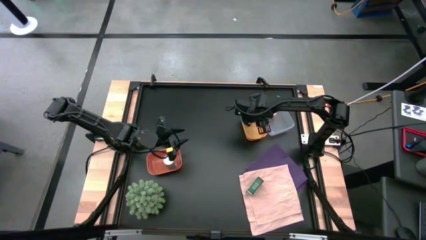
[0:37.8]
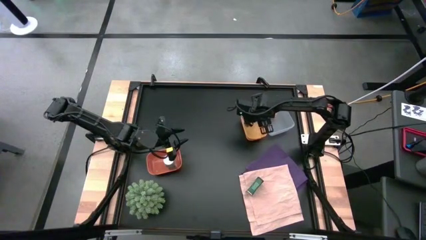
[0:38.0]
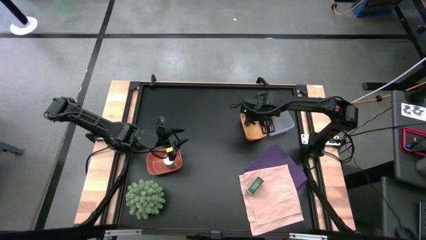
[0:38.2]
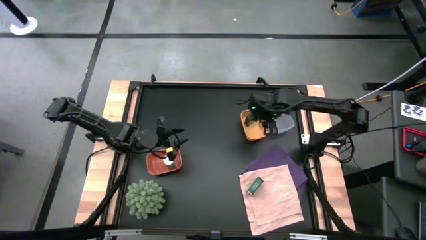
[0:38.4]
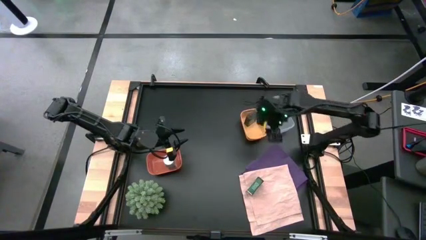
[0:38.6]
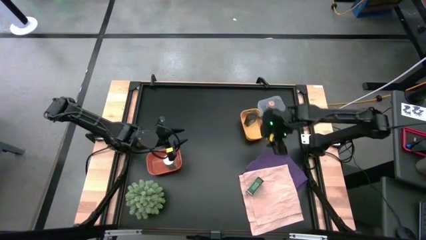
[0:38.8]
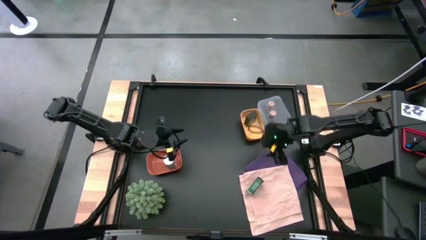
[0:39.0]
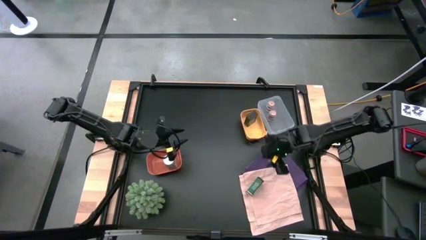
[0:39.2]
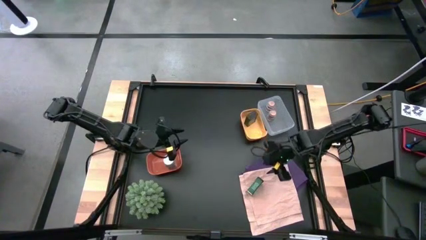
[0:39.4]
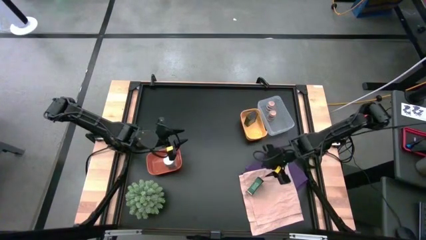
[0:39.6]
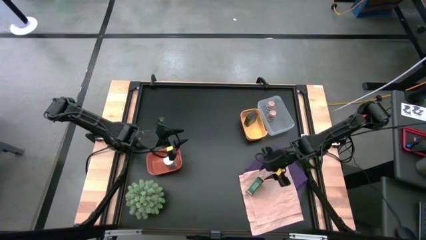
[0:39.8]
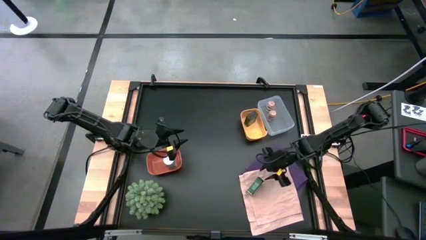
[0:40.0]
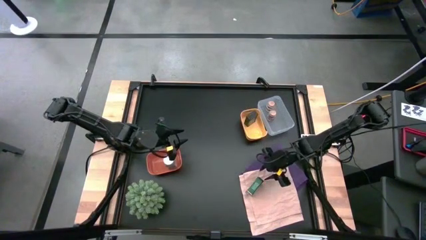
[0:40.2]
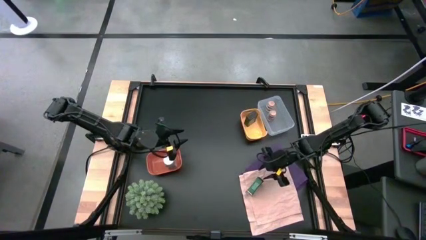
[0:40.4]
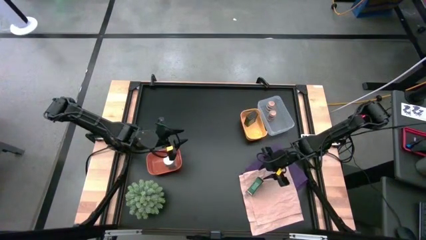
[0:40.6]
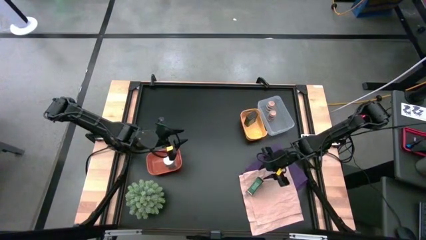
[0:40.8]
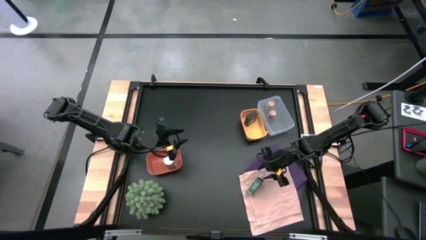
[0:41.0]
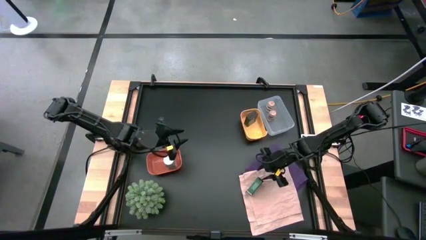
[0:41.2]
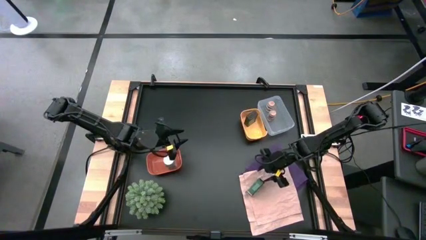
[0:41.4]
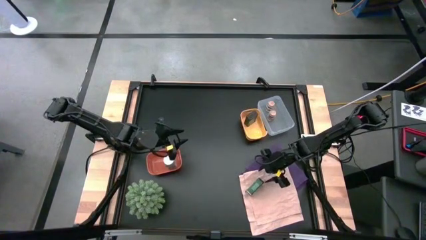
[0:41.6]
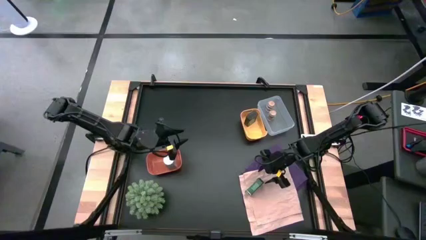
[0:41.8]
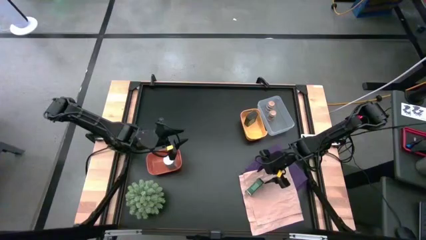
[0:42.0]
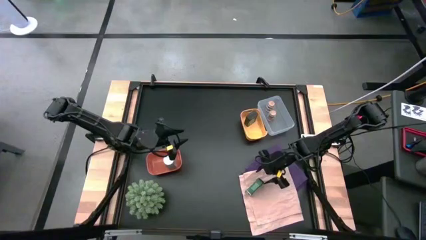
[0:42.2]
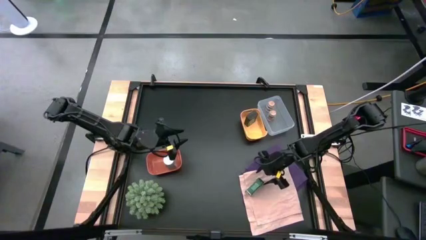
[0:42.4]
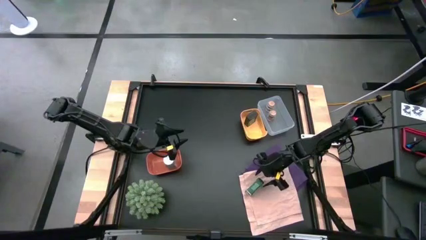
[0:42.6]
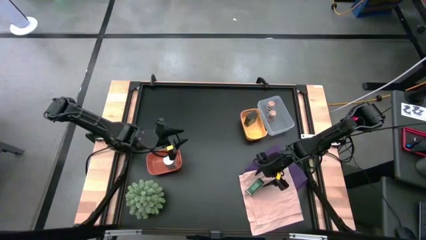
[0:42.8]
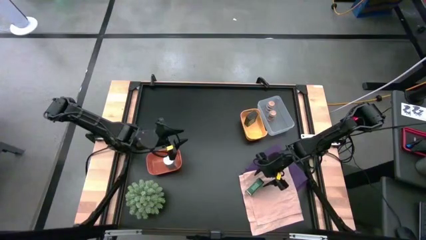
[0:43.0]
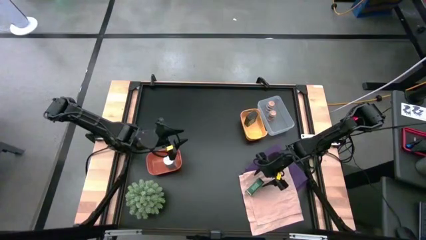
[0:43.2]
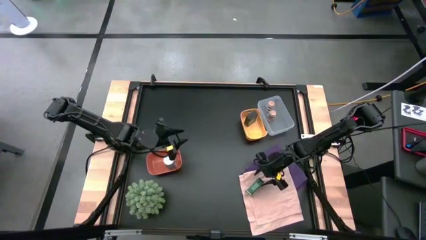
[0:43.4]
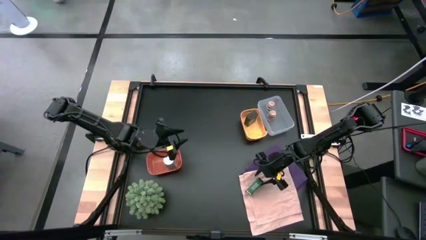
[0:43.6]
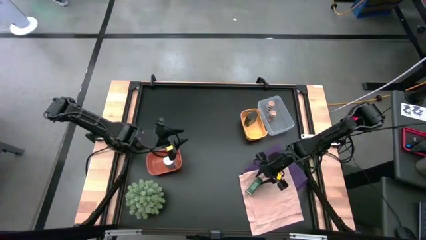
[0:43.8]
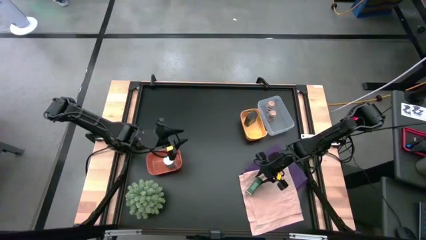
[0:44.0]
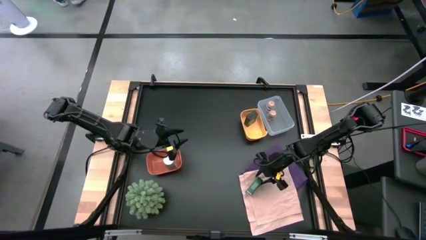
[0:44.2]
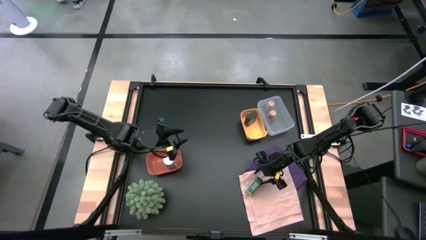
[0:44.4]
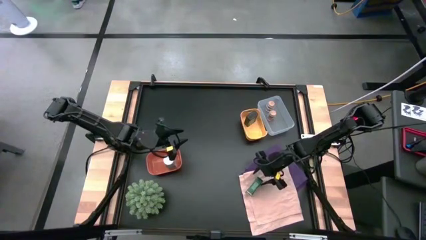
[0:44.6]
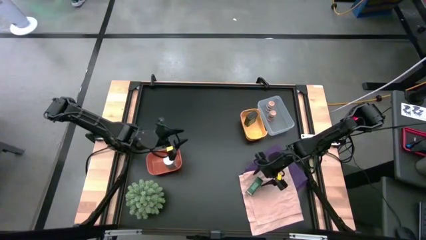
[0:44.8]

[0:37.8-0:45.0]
Task: Sort spices by type
Put the green seasoning can into the yellow bin

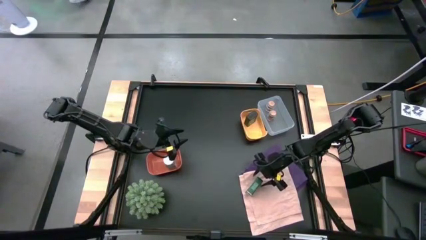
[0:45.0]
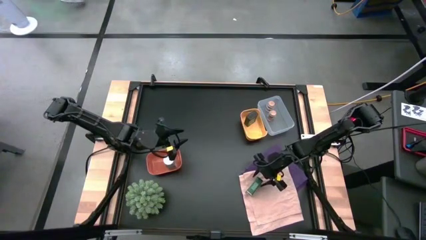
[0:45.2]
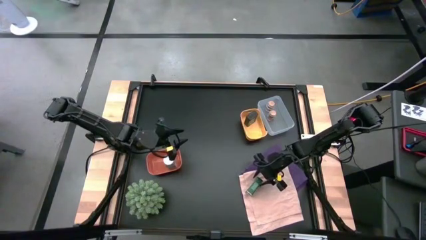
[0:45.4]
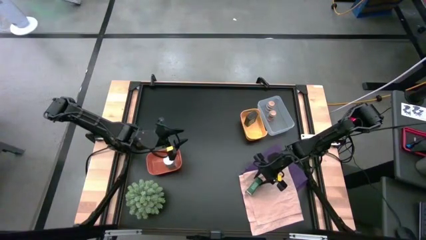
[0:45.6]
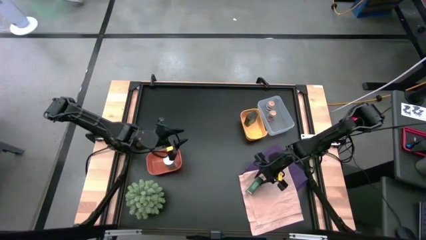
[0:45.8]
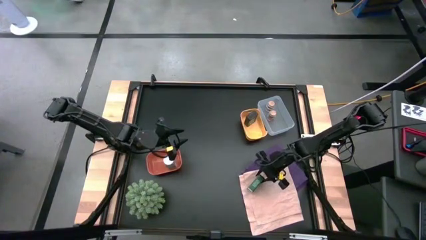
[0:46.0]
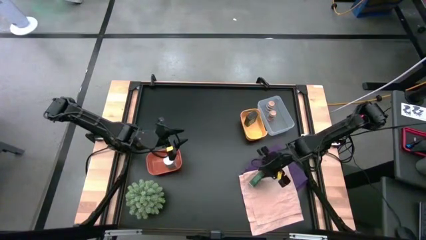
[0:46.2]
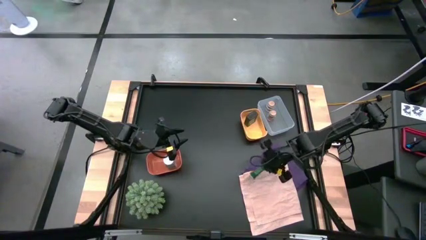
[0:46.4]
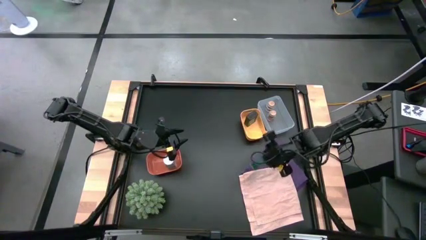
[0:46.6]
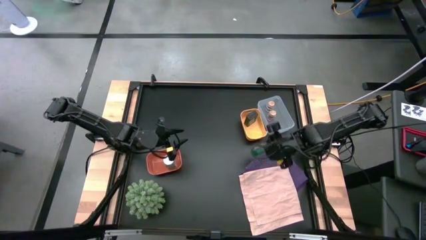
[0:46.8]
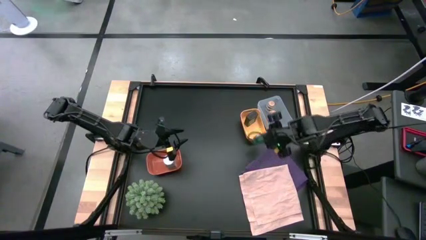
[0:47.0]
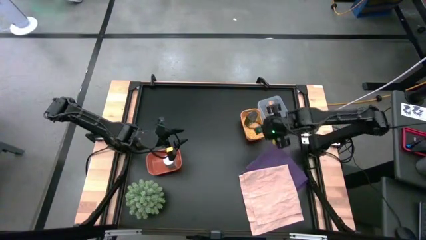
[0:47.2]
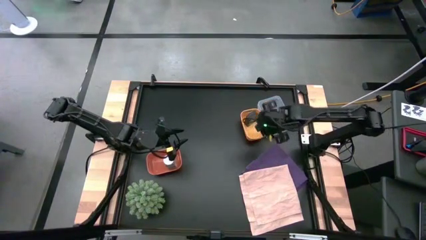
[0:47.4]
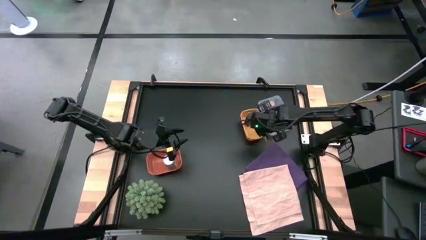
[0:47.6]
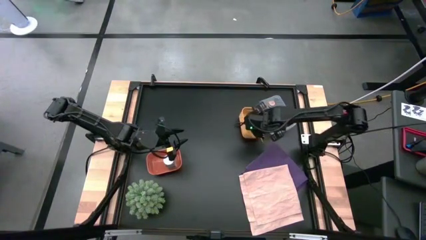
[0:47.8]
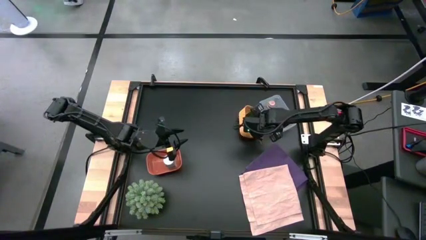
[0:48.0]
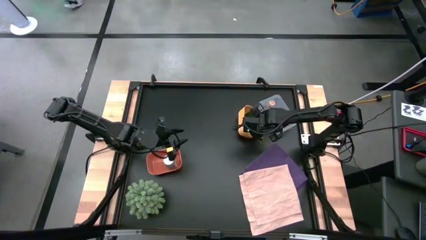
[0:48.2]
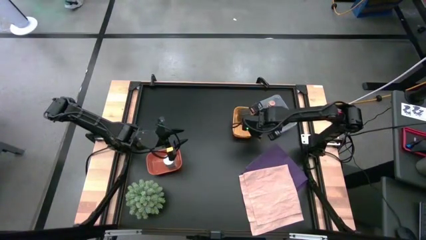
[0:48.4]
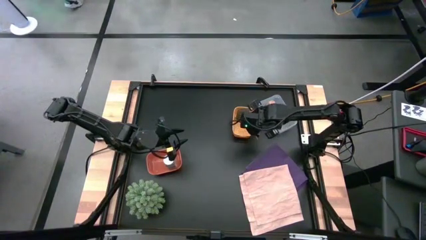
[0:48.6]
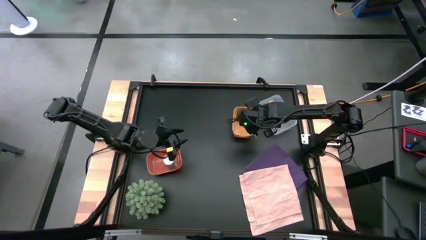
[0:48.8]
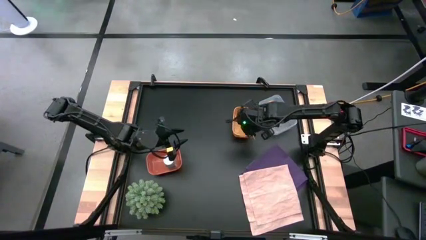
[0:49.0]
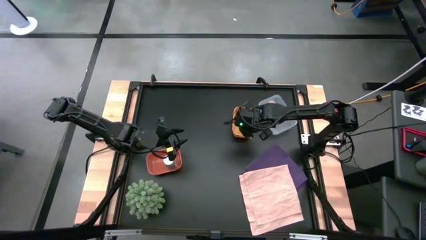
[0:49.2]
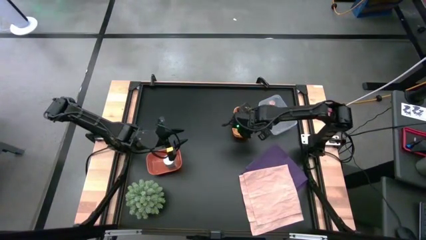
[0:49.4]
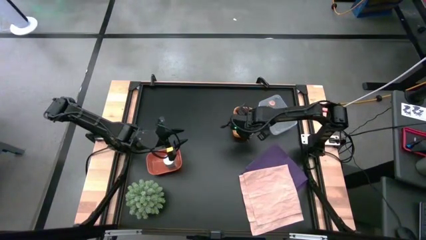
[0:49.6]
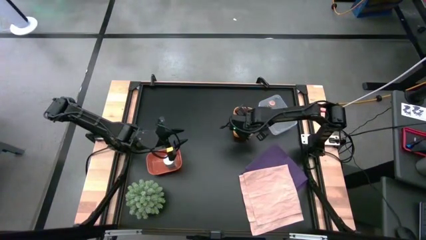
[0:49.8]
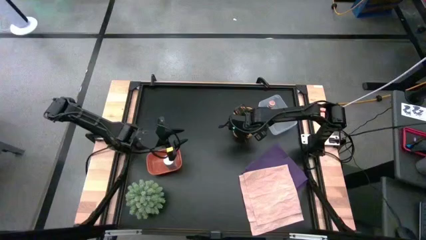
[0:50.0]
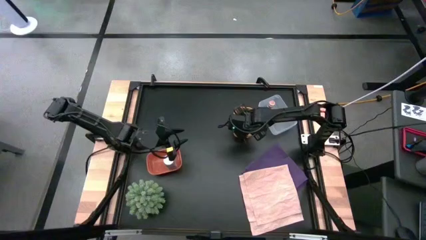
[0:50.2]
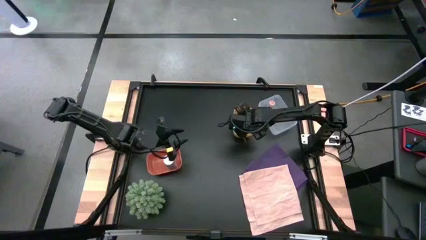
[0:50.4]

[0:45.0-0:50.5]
Put the green seasoning can into the yellow bin

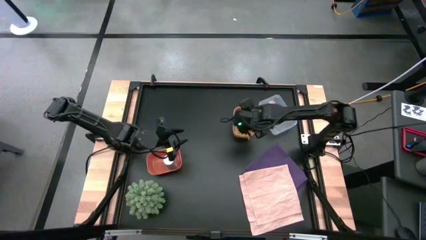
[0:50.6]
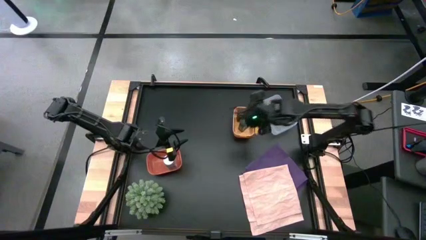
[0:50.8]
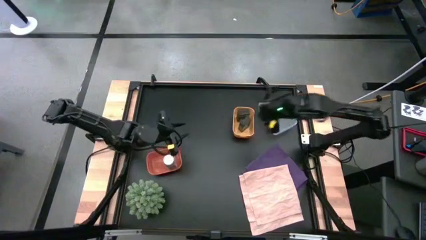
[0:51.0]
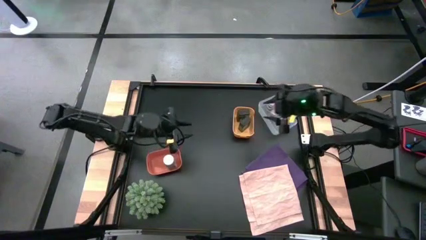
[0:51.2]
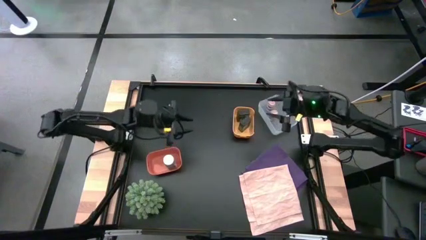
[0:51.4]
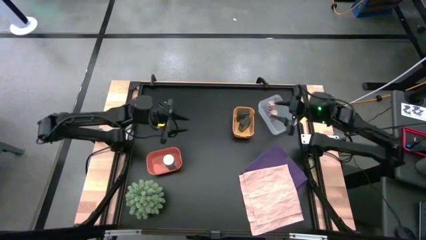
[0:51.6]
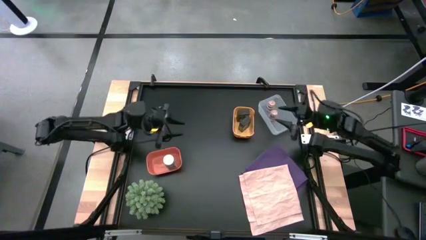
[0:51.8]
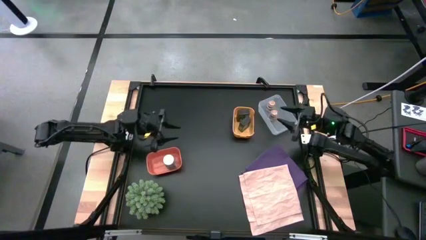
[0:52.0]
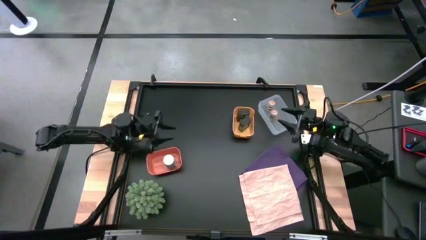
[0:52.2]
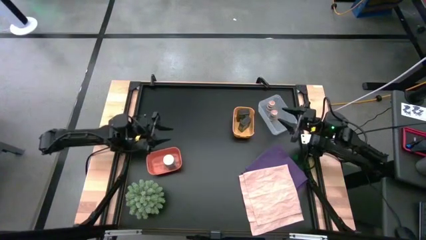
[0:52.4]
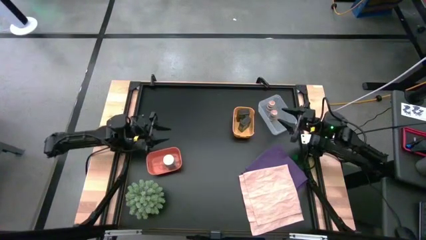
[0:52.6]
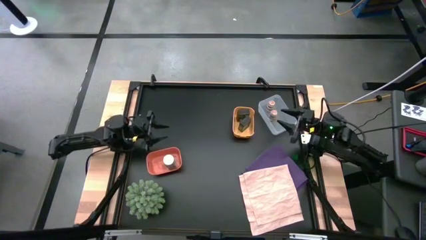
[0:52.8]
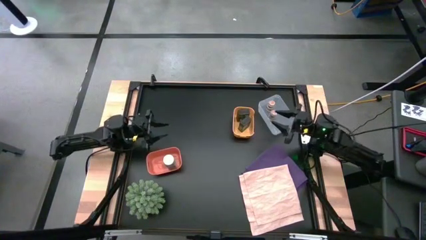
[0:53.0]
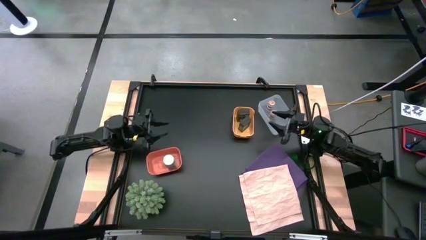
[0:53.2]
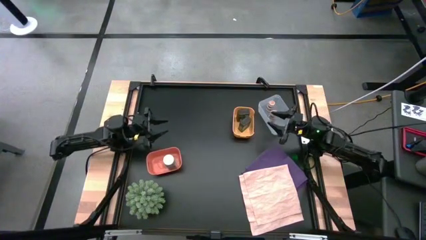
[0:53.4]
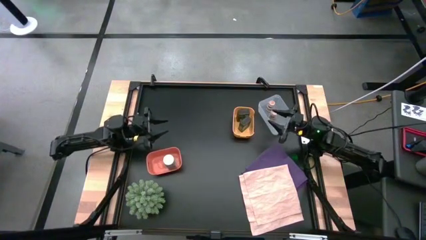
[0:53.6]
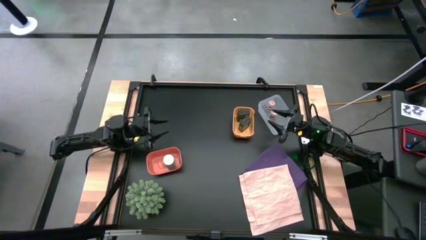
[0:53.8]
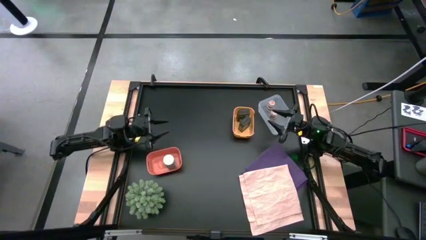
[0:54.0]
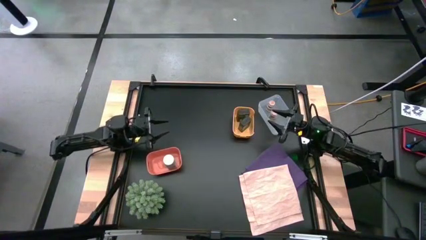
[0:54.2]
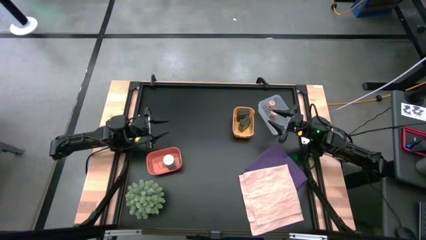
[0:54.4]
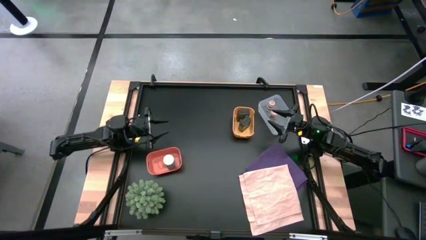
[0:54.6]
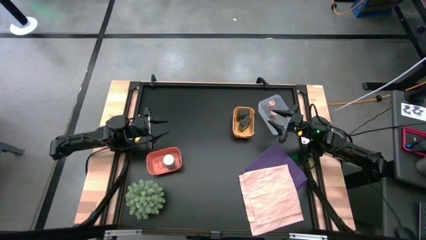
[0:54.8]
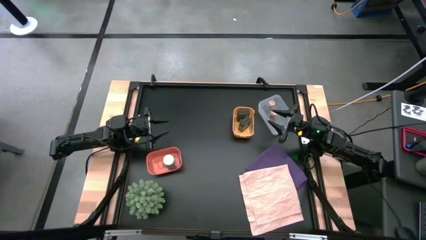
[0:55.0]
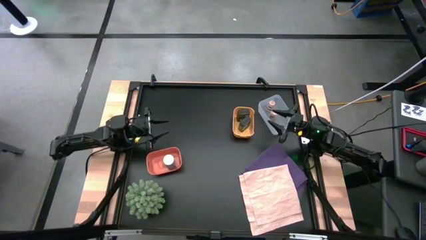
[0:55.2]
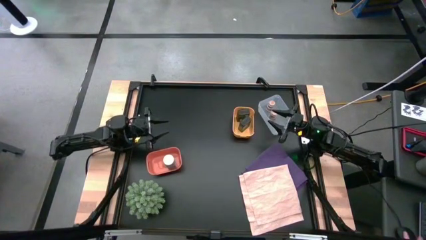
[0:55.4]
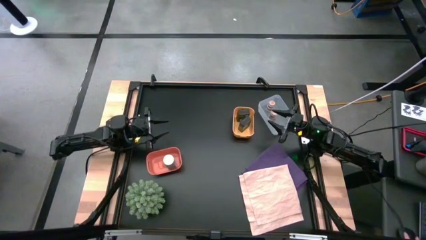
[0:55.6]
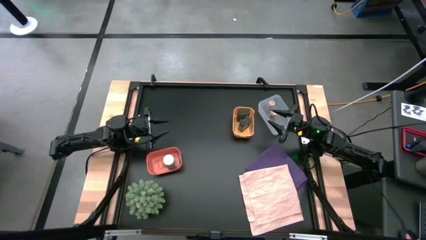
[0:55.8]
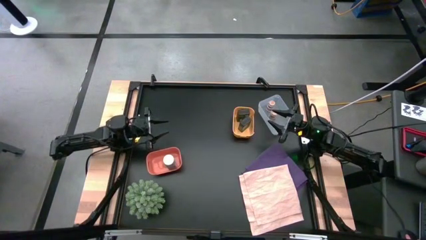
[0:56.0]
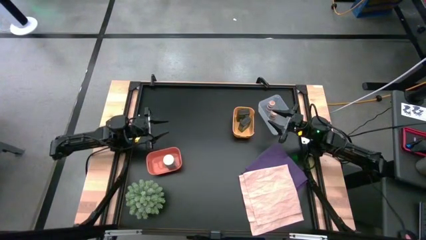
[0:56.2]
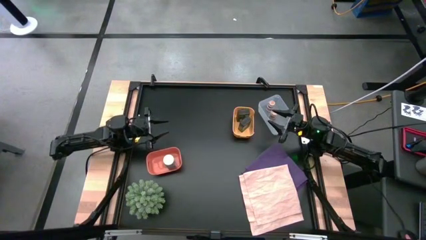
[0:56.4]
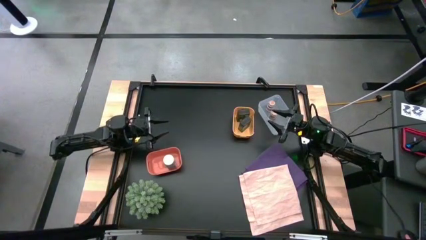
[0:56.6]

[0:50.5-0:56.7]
Return to Home Position
